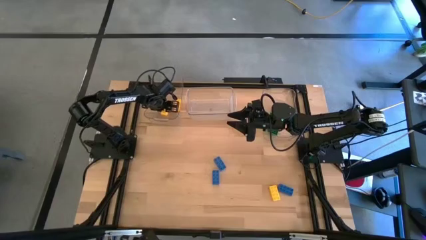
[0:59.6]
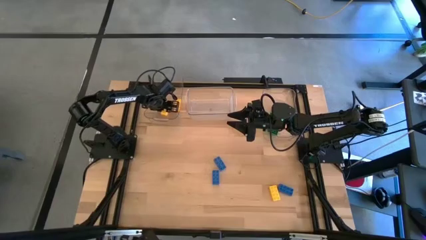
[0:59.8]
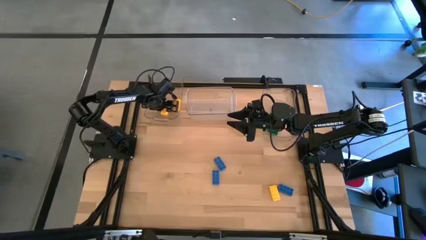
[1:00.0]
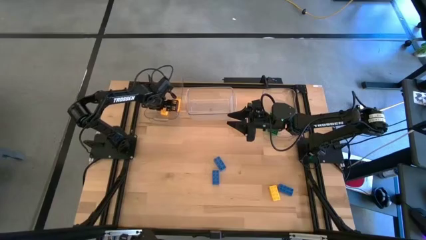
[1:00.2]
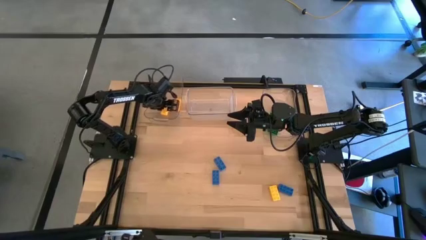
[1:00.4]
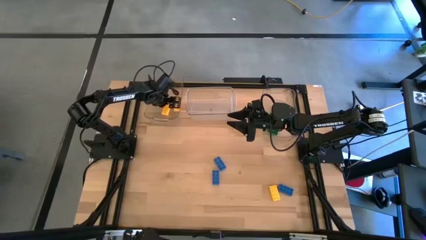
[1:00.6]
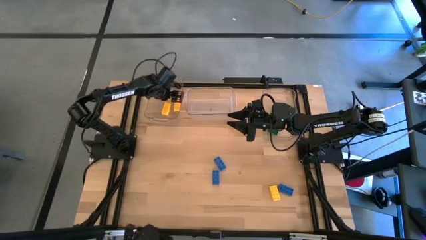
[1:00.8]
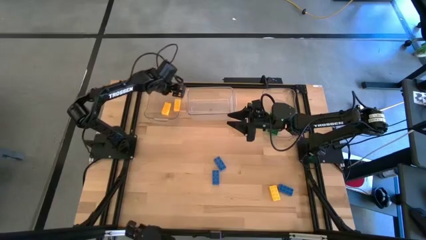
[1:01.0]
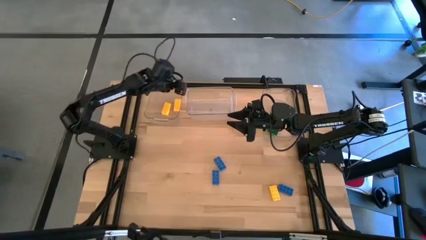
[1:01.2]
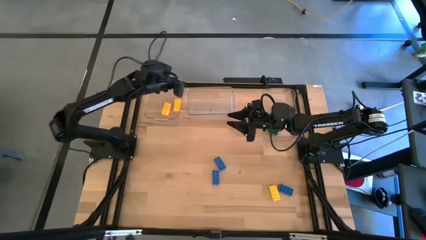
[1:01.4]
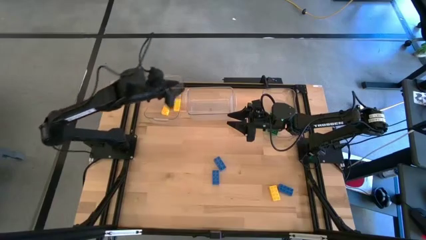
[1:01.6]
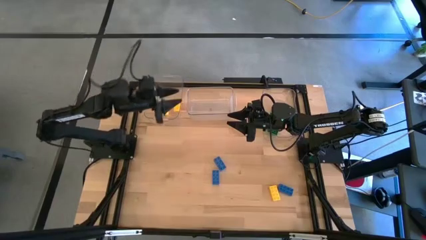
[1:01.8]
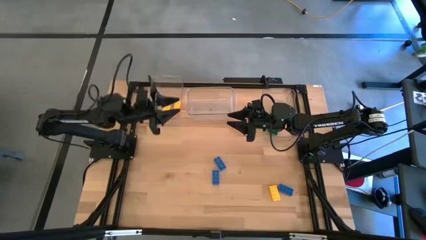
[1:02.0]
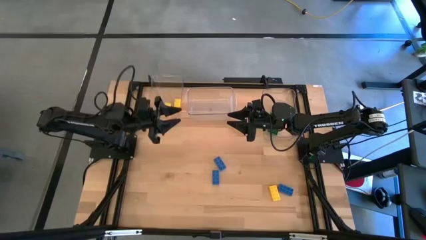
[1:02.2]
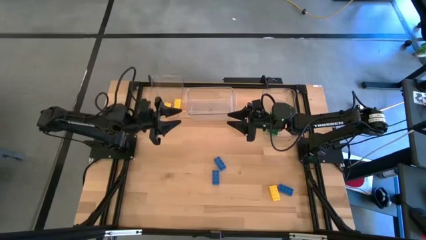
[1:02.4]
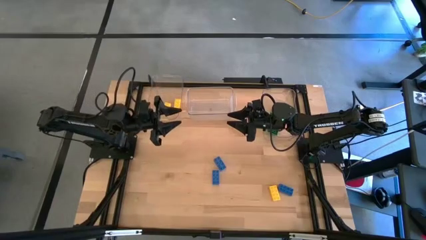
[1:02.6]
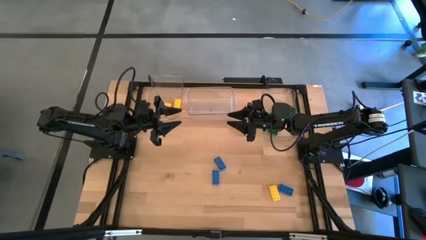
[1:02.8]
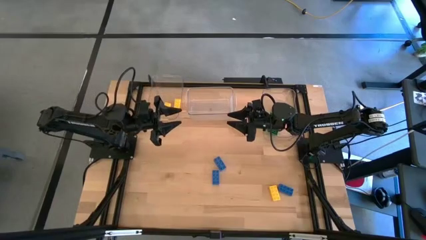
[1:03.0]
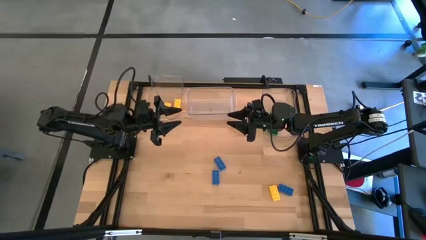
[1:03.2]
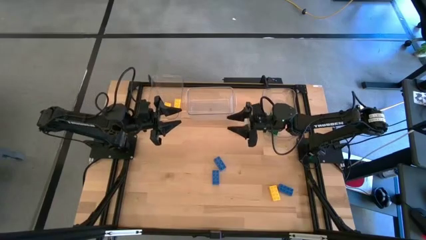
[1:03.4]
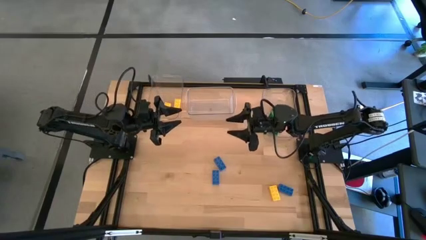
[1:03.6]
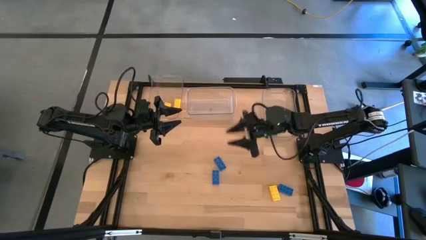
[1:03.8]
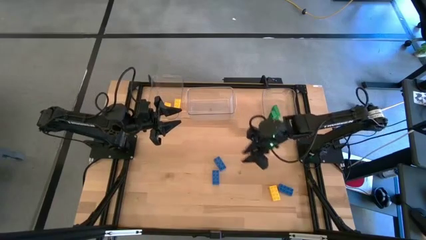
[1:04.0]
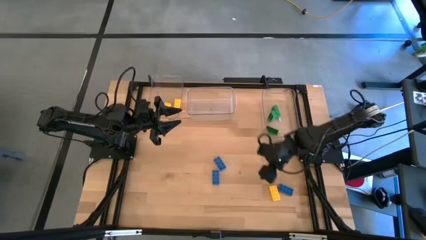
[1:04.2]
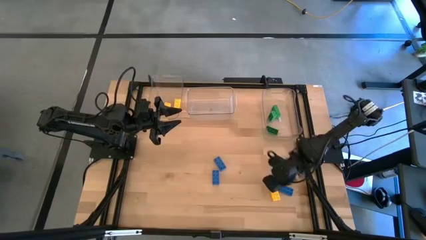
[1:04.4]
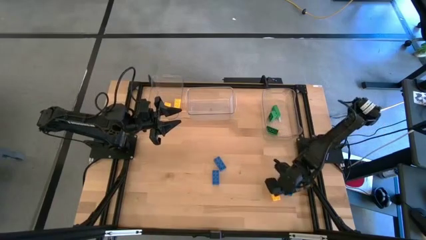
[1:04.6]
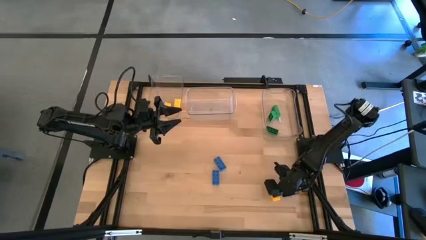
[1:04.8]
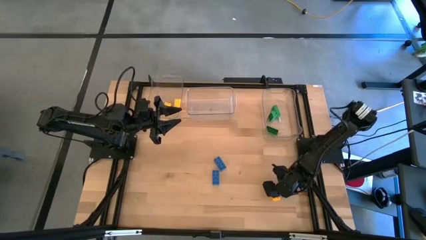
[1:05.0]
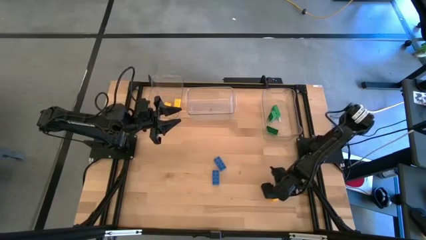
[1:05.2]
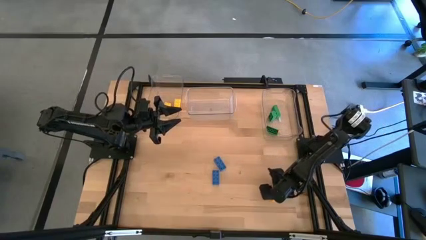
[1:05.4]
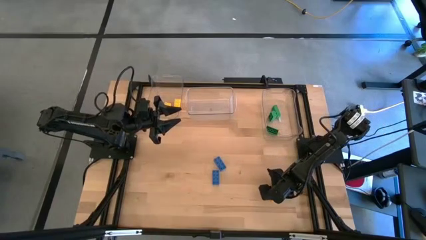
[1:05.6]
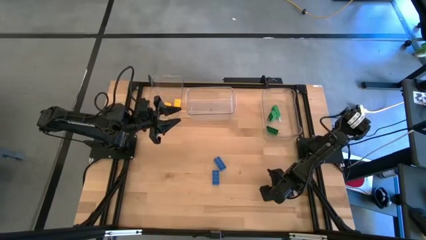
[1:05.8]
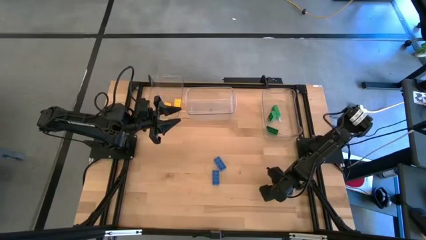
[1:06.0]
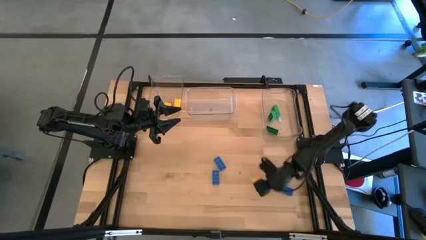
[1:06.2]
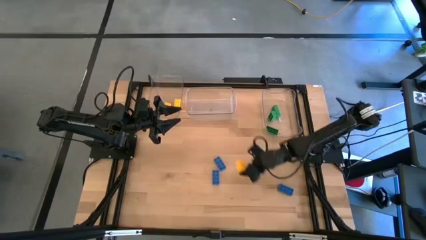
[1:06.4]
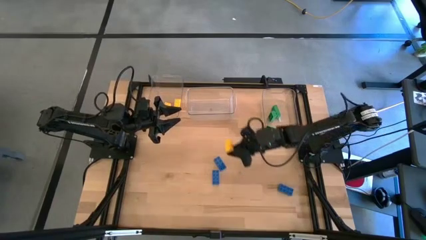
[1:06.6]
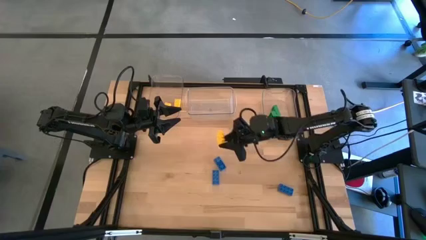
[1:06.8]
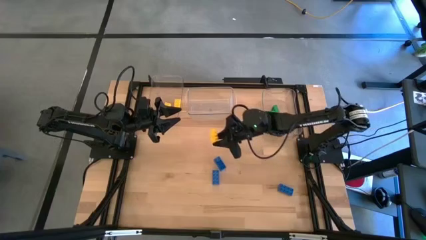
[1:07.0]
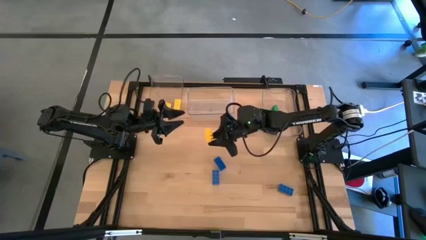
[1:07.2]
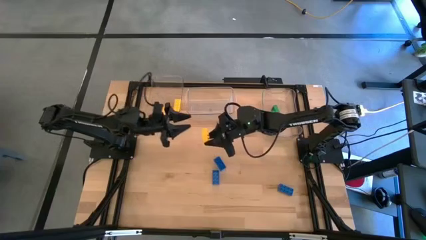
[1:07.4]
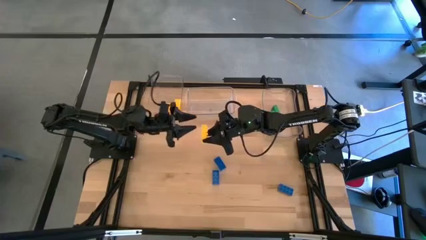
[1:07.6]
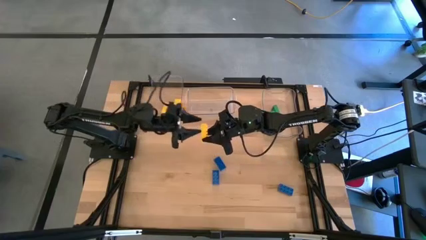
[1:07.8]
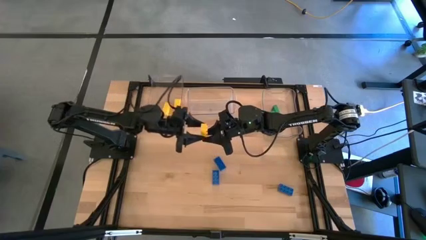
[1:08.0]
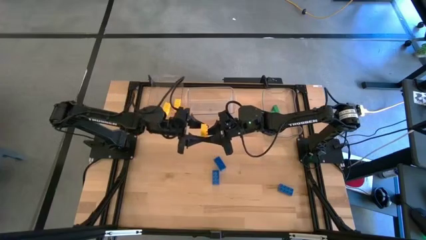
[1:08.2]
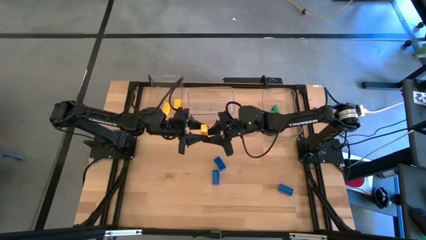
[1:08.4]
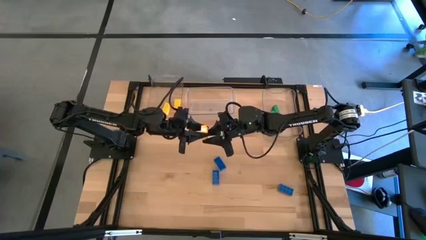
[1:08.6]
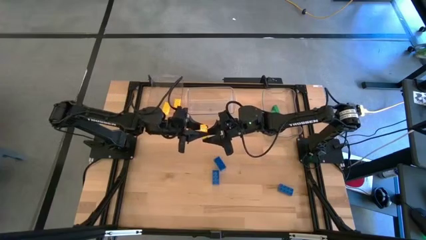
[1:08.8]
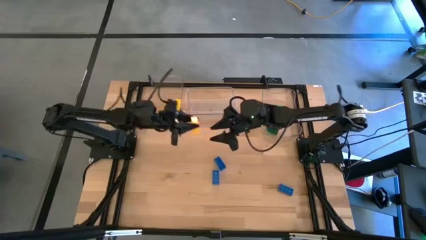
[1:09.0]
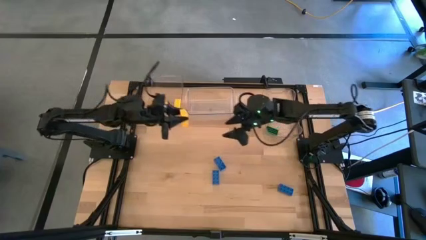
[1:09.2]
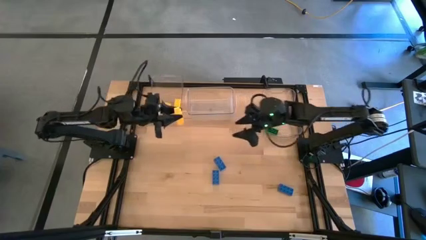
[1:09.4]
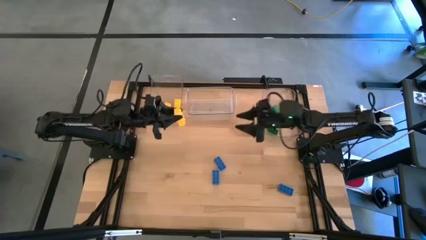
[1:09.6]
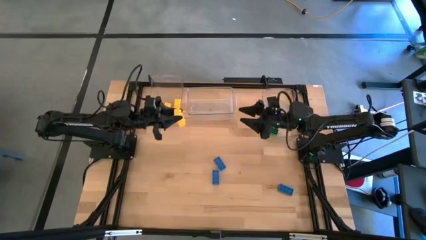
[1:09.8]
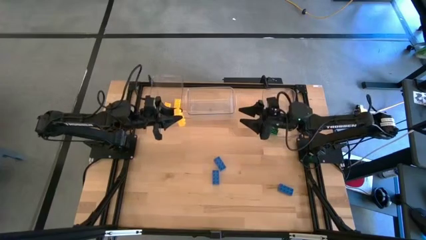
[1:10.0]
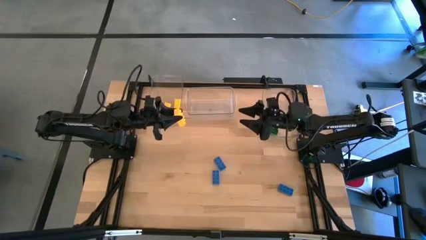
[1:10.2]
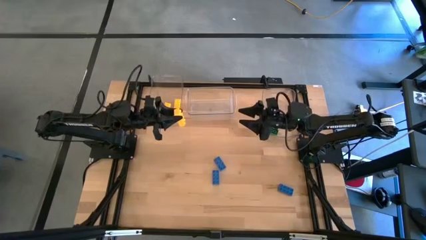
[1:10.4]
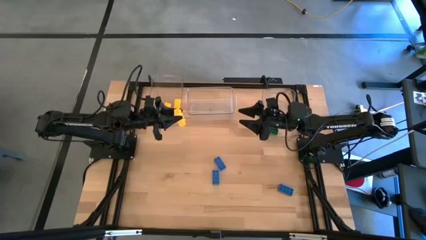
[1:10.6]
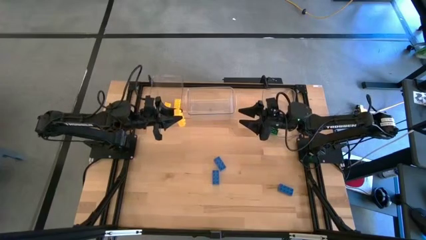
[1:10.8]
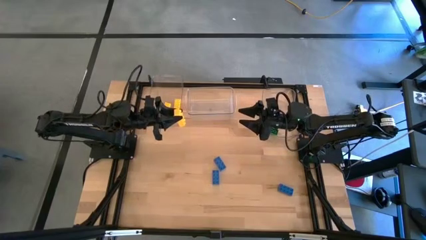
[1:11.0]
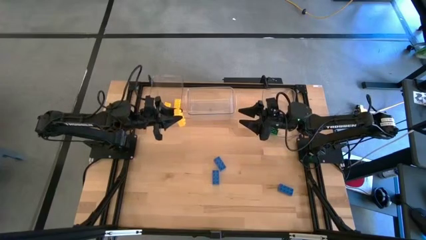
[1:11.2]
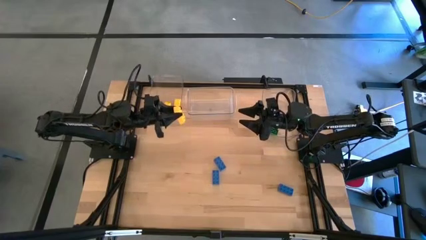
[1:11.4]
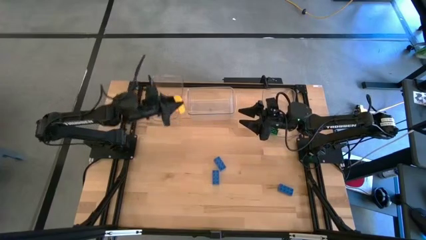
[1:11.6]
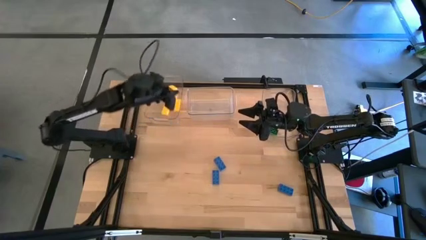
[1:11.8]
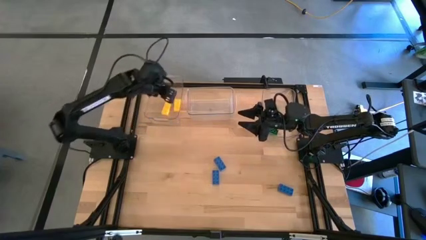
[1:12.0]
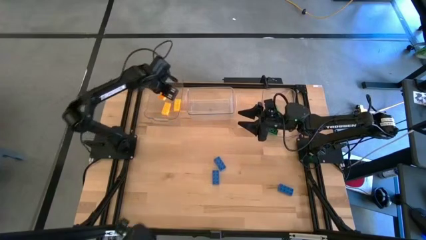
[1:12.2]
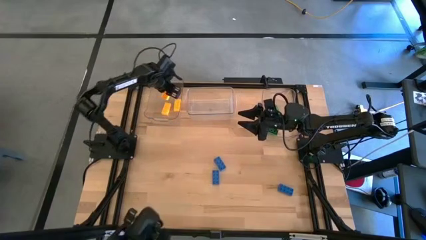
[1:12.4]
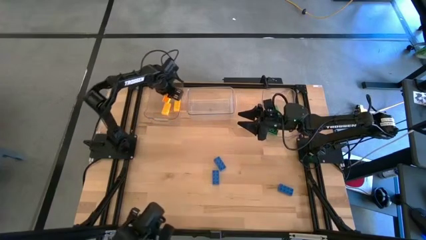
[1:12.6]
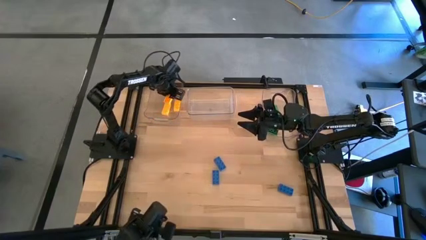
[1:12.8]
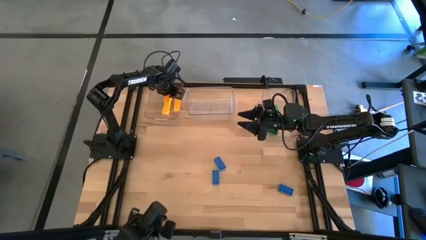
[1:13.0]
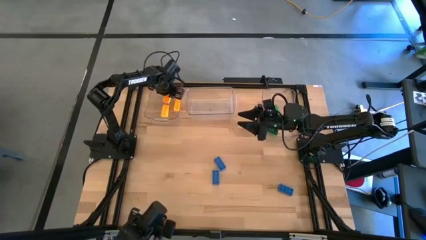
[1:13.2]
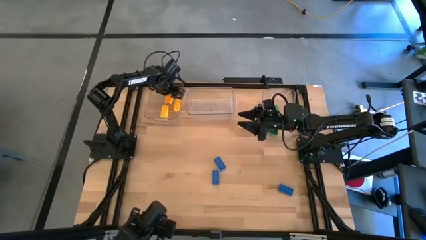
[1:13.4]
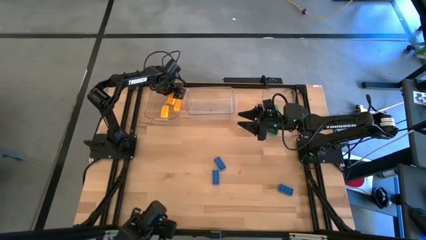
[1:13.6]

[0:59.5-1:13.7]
Task: Sort & place blocks by color
Put the yellow game piece into the left transparent bin

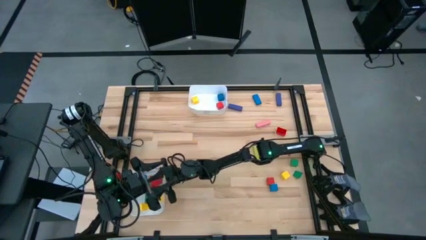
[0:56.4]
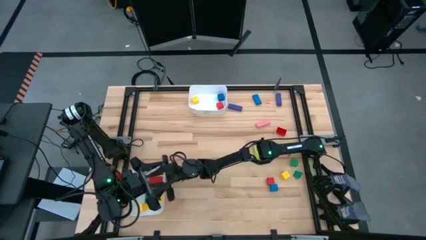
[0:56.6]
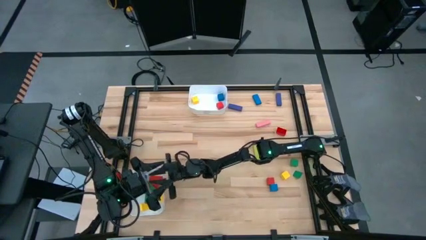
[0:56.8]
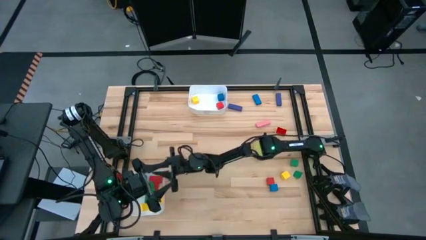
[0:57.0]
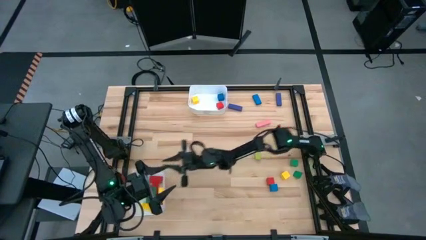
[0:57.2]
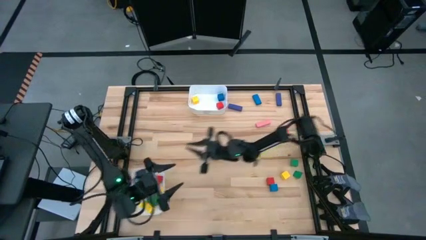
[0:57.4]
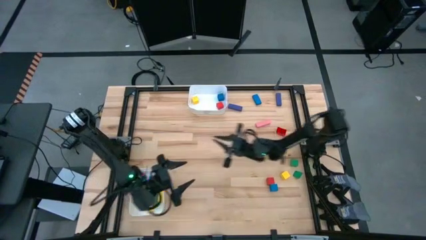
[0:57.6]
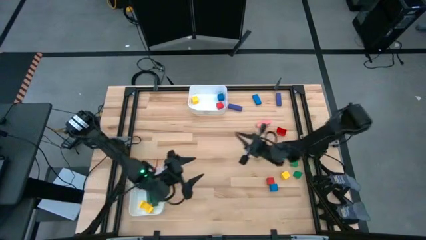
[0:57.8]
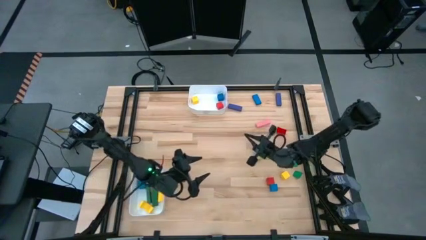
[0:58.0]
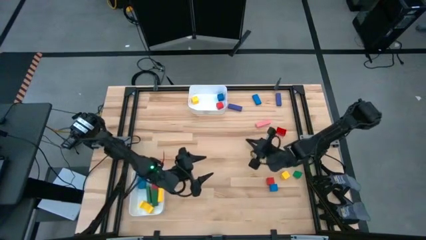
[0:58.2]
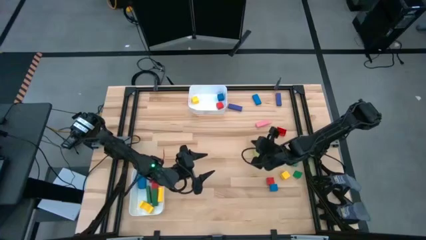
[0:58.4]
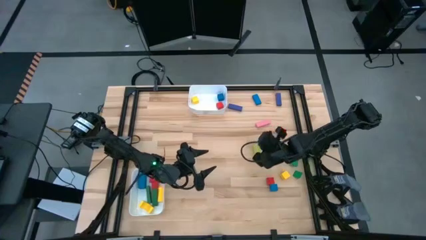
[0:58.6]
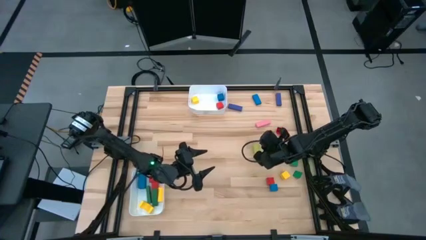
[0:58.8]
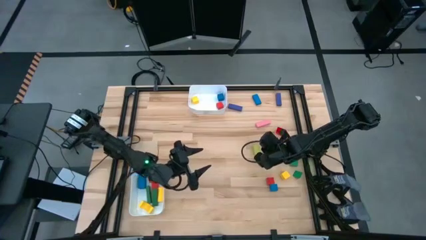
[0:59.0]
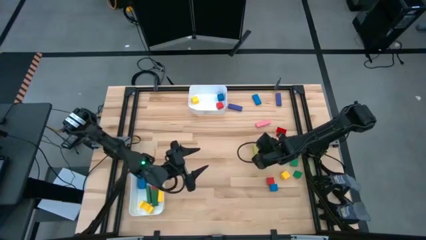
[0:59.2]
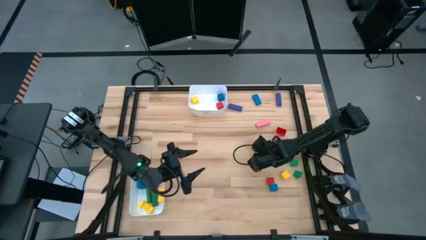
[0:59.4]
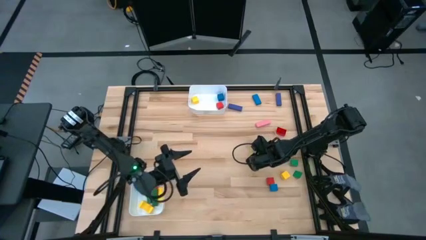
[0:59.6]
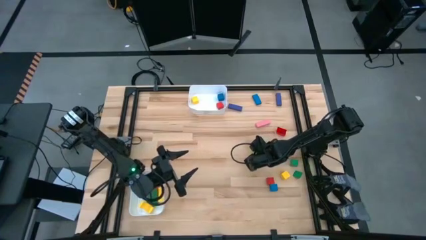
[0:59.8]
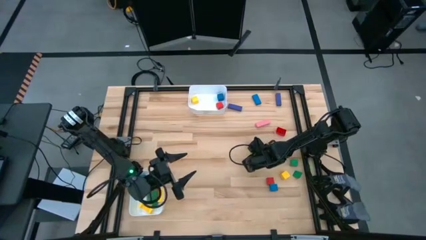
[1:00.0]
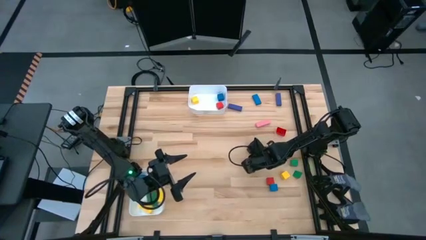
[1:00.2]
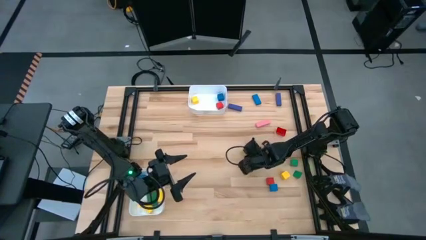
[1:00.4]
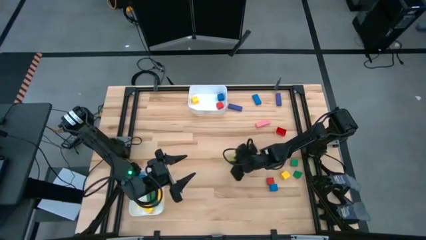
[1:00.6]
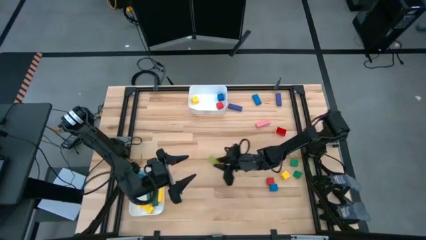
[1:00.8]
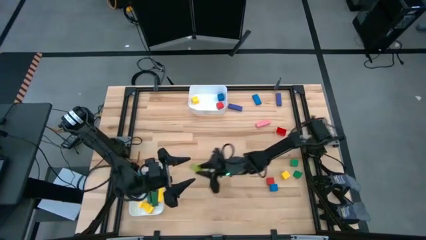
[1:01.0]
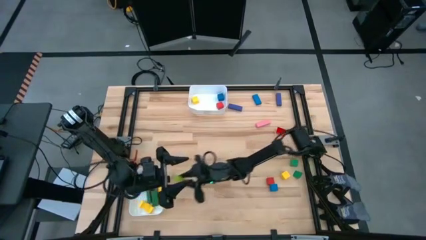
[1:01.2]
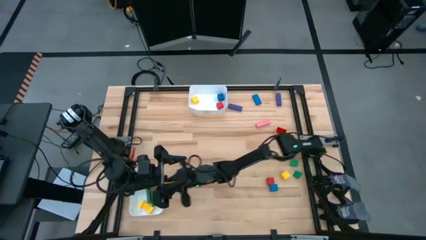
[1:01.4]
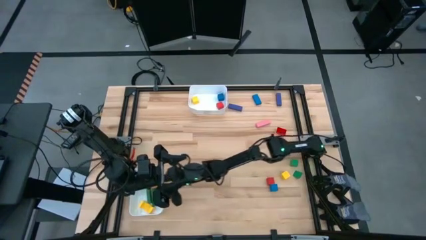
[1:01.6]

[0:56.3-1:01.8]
Task: Sort blocks by size
Put the light green rectangular block into the bottom white bin
